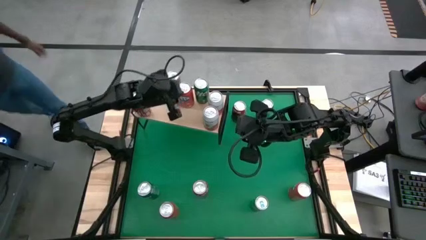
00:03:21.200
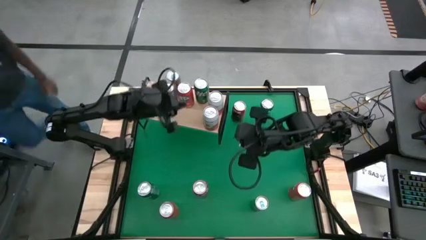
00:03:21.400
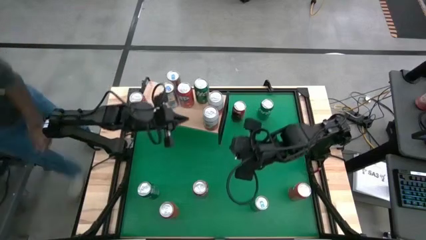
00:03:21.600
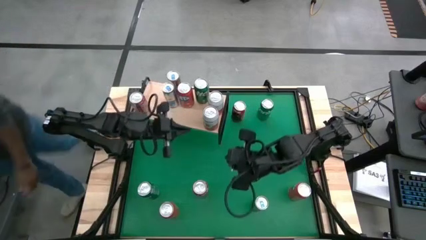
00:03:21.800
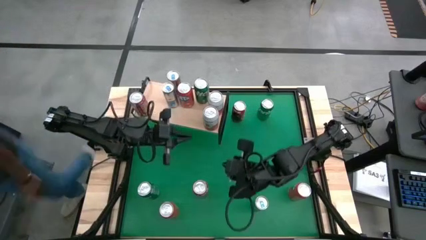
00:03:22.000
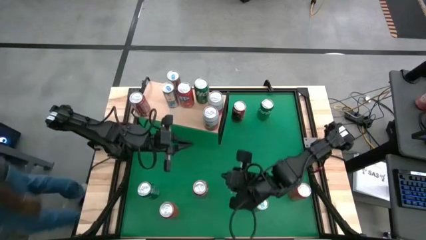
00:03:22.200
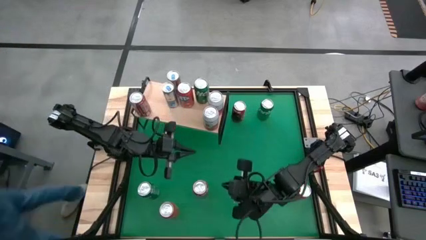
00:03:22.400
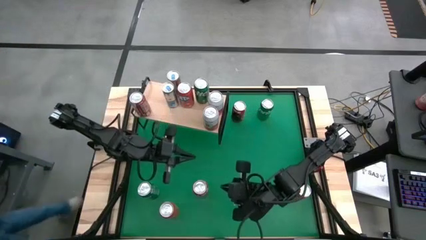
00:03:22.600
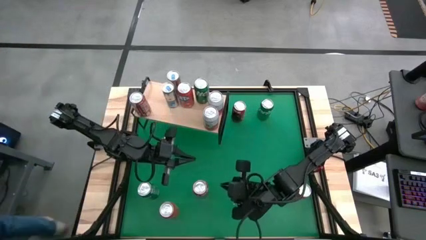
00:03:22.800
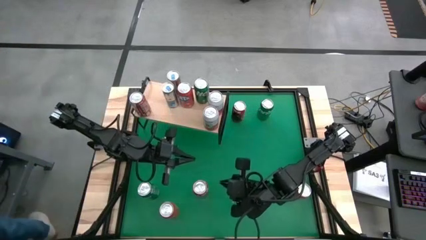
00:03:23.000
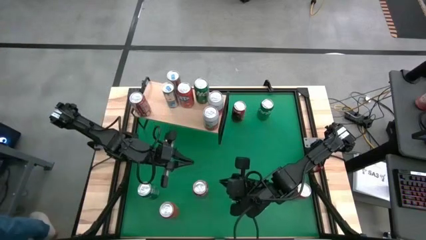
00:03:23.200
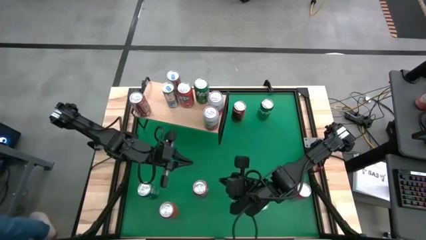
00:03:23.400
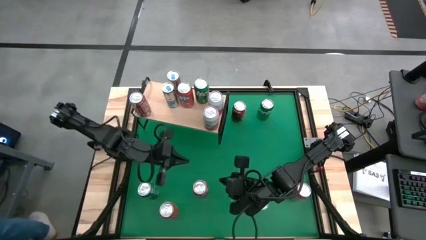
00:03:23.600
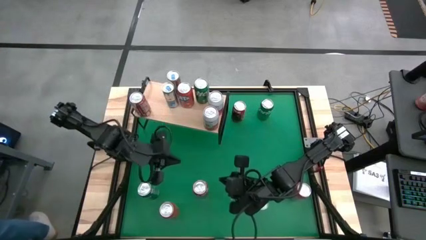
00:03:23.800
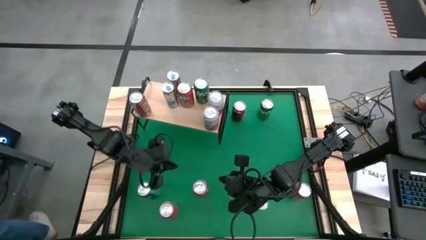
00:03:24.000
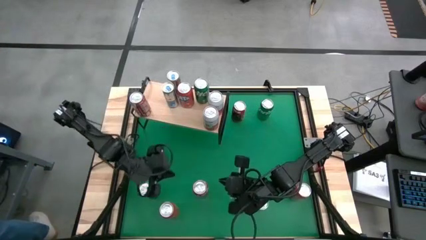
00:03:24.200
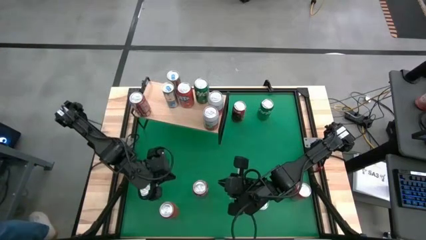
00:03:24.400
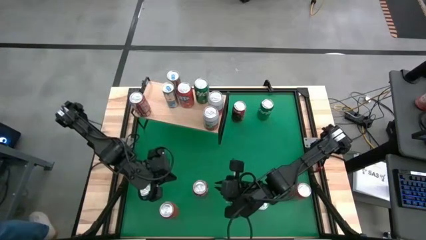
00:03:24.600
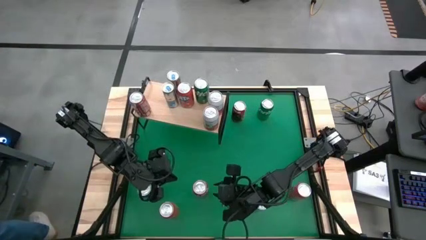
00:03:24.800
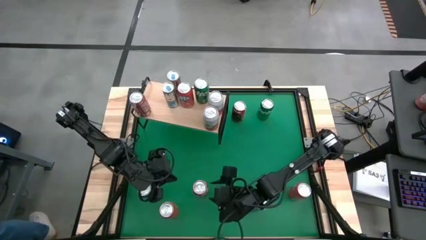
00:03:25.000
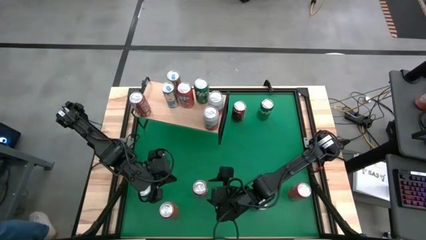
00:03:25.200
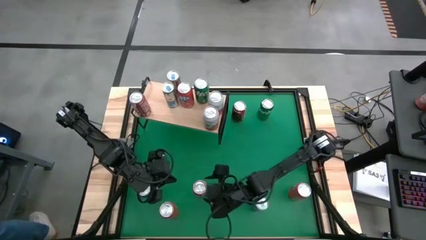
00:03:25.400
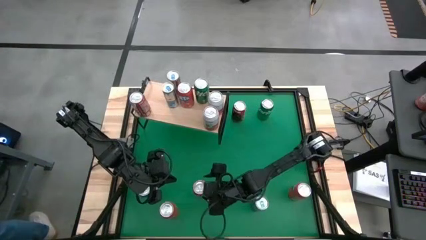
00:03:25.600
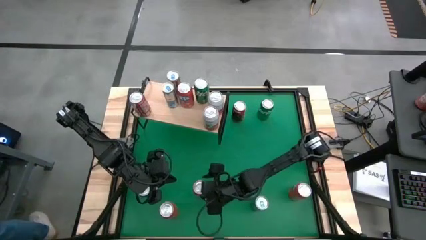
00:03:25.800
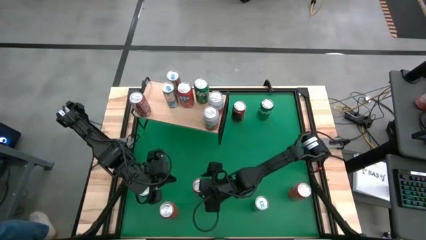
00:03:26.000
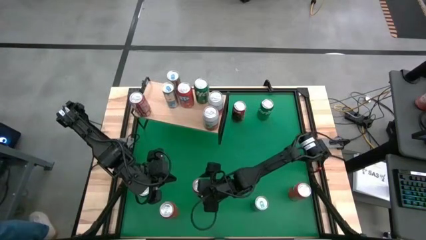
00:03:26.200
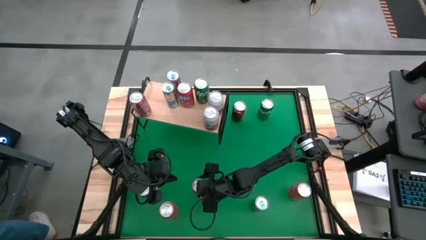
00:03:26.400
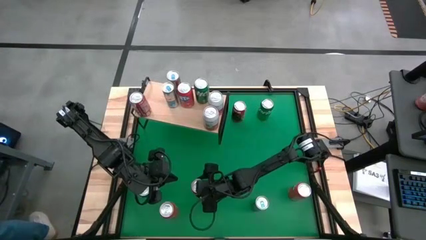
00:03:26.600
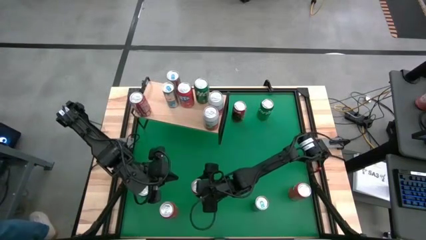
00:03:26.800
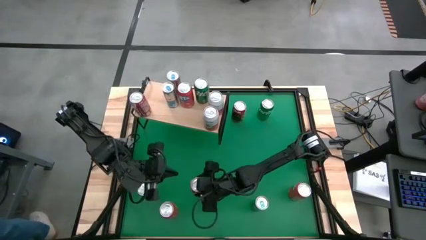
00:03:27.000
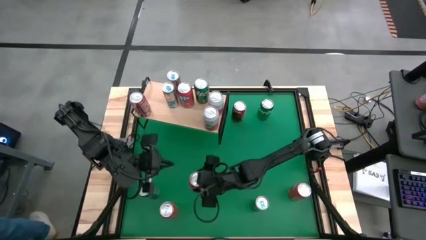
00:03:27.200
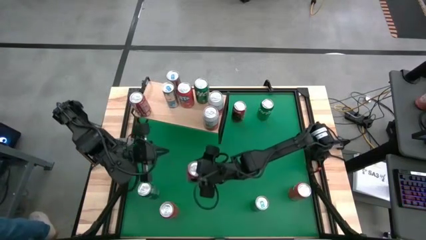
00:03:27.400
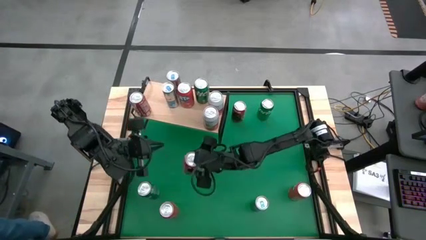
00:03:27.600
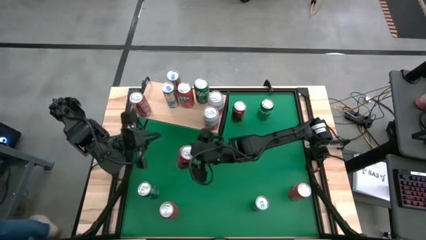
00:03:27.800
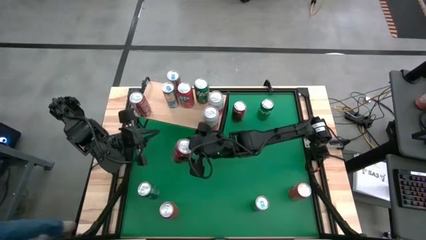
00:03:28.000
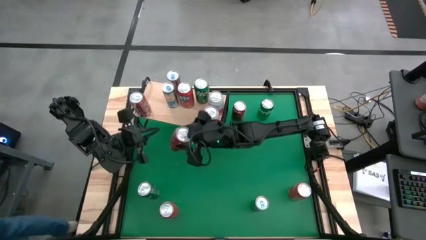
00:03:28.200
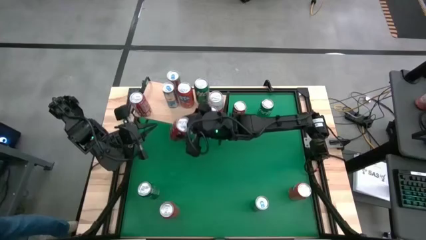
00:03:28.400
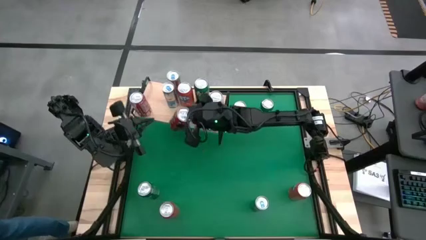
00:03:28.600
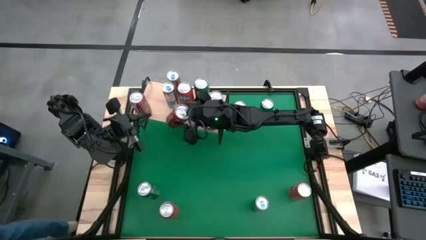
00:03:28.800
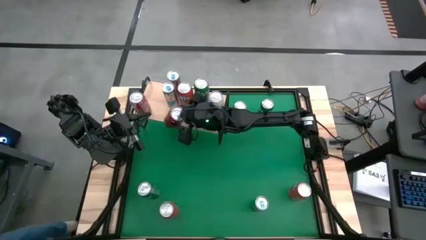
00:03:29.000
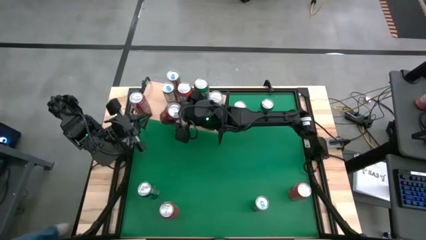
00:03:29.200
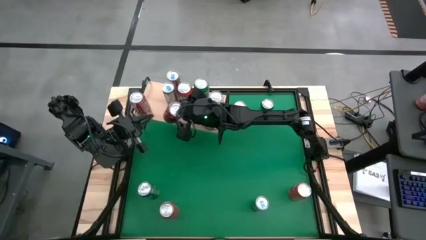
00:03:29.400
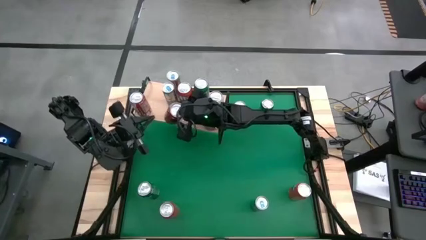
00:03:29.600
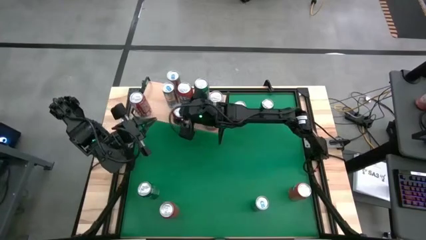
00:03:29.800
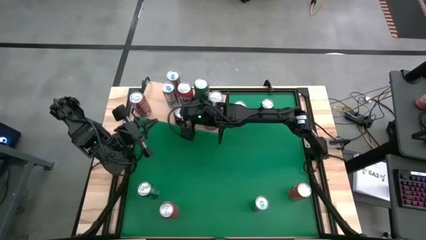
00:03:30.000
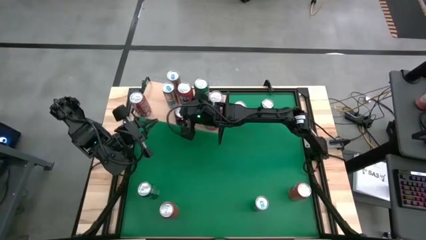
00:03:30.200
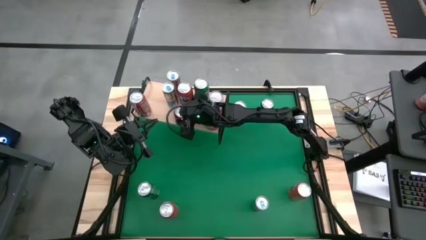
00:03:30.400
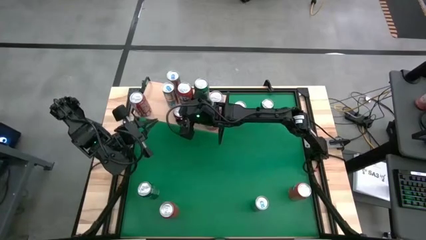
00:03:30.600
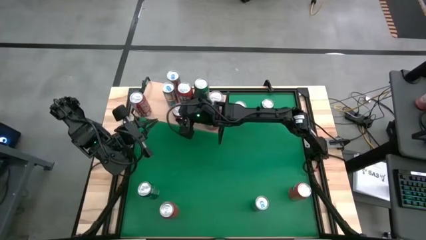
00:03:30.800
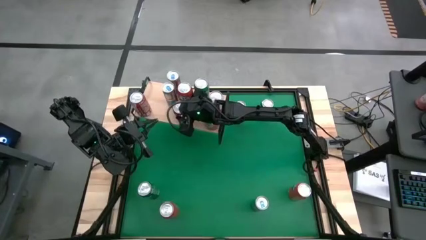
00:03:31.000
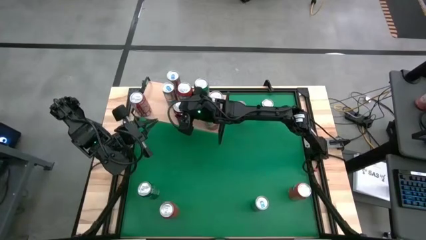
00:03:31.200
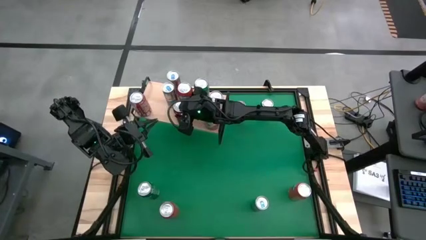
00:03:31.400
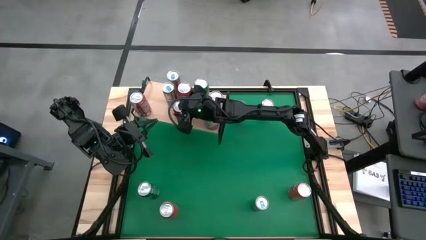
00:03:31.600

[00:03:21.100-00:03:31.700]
Task: Place canned beverage on shelf
Put the red/black soda can on the shelf aligned with the other red/black soda can

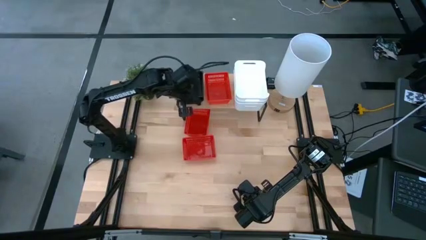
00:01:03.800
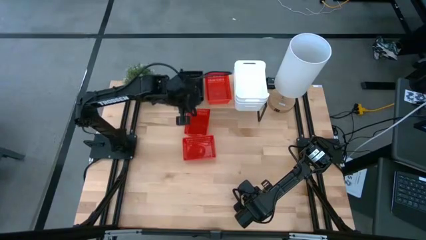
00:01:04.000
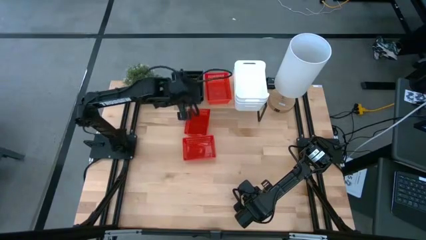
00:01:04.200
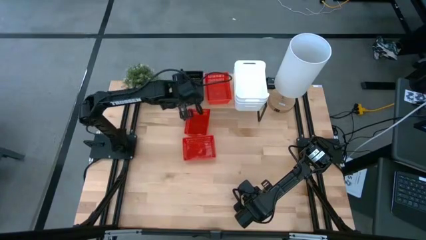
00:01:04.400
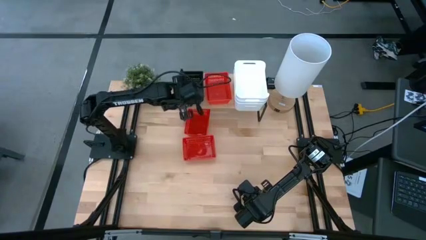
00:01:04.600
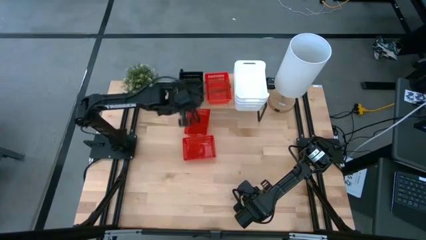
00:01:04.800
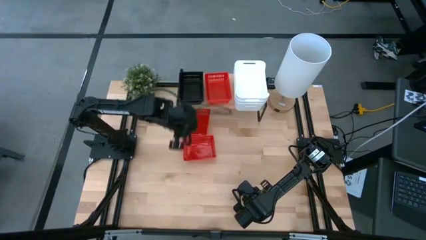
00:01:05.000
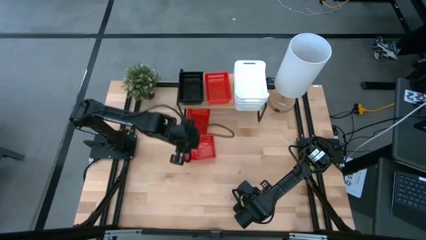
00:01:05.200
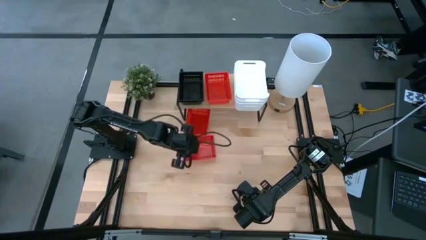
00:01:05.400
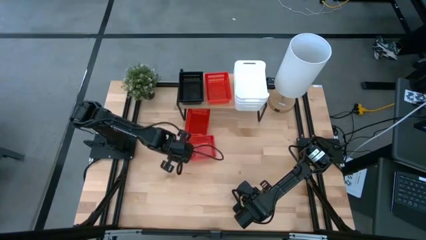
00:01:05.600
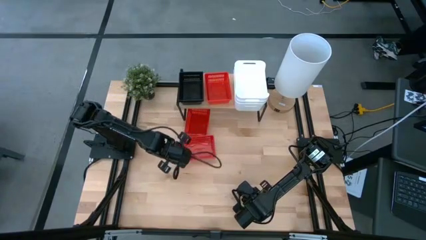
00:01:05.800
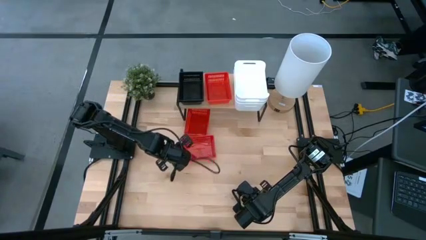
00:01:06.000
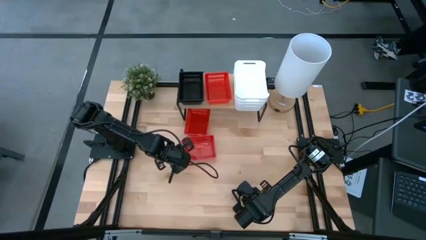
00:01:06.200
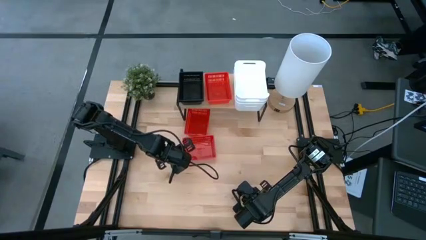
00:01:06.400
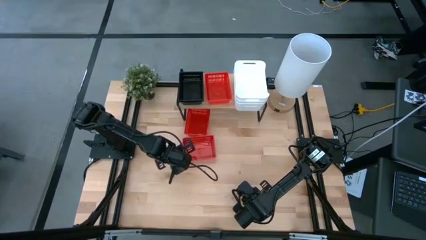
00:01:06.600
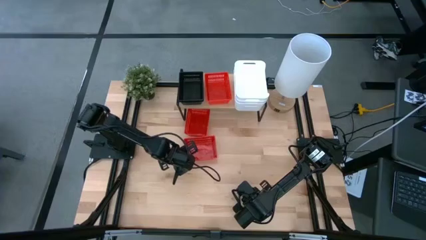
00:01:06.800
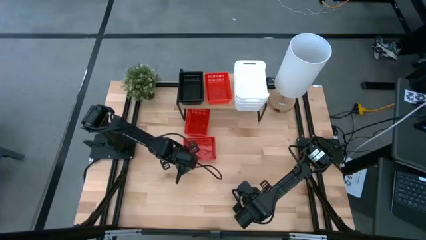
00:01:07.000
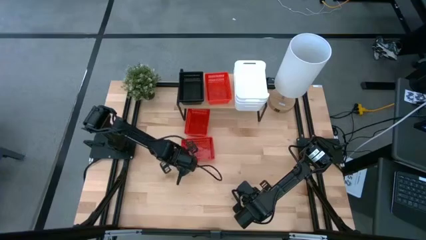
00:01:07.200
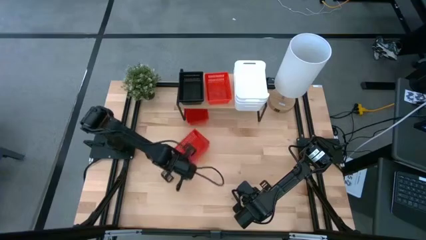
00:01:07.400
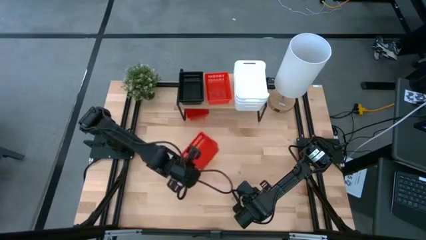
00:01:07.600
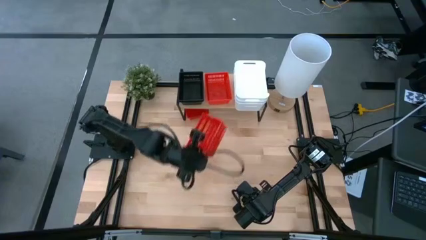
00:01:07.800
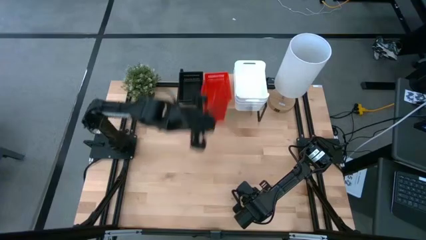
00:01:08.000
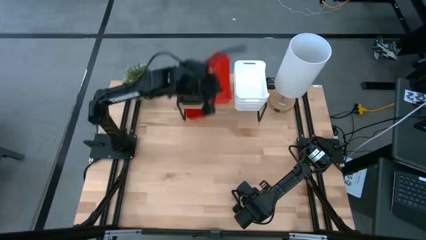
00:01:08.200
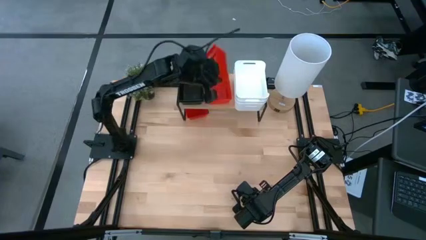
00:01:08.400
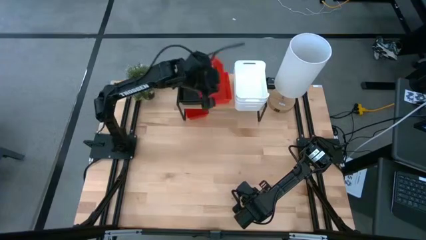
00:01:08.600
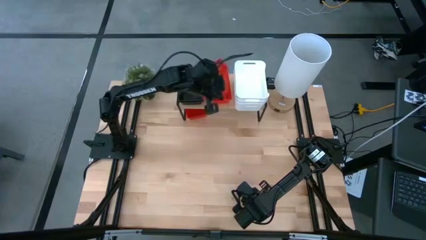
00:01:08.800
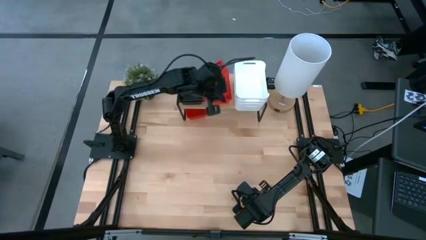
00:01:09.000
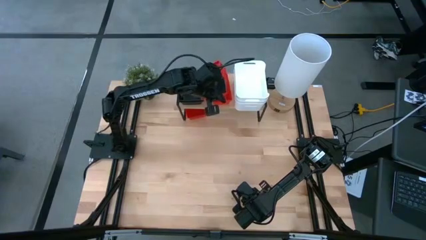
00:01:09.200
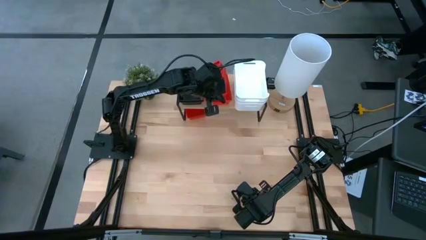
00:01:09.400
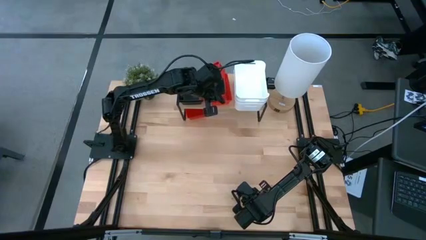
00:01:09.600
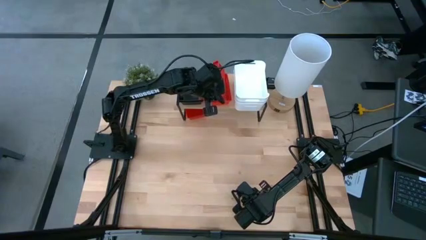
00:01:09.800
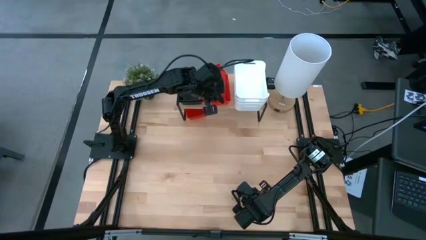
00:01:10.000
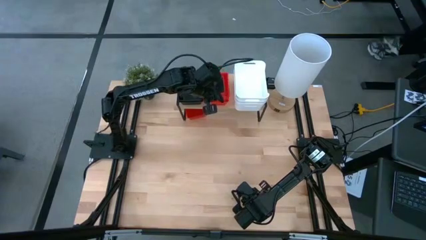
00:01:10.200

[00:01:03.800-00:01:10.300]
Task: Stack baskets on shelf by color
Stack the bottom red bin on top of the red bin on the shelf
